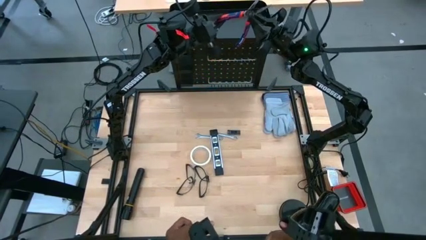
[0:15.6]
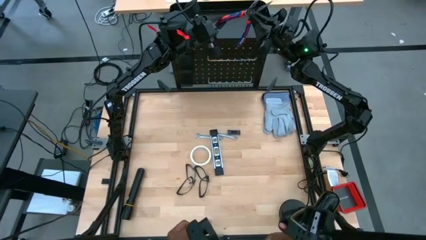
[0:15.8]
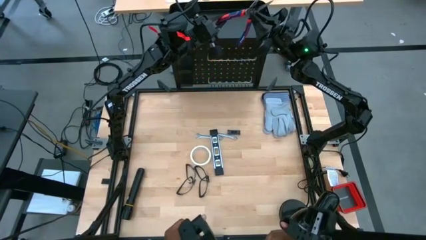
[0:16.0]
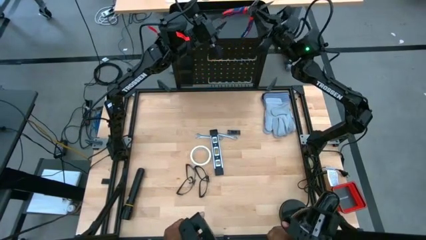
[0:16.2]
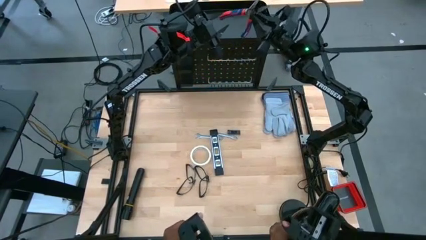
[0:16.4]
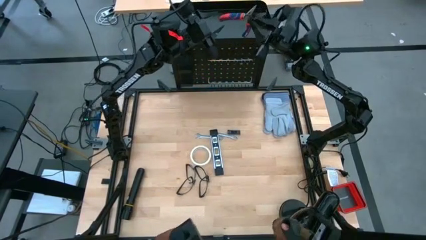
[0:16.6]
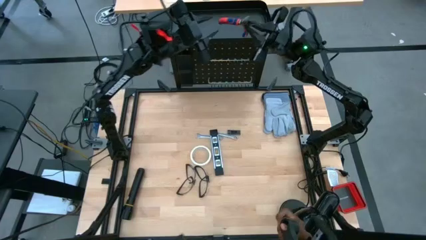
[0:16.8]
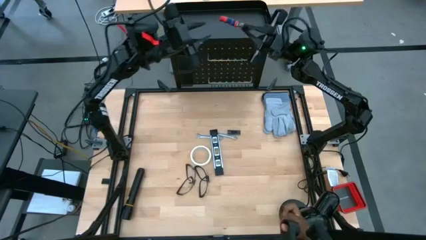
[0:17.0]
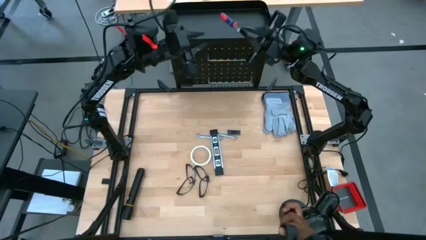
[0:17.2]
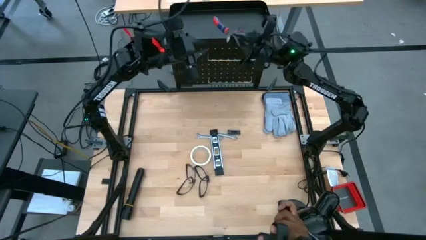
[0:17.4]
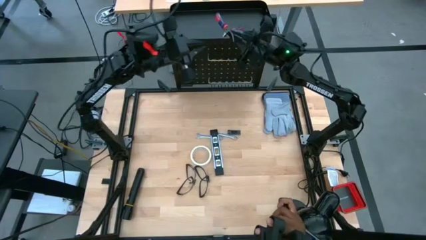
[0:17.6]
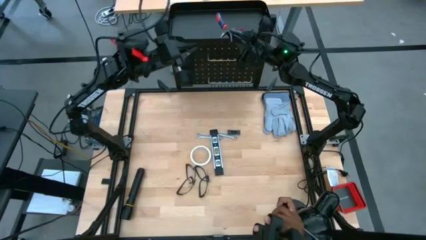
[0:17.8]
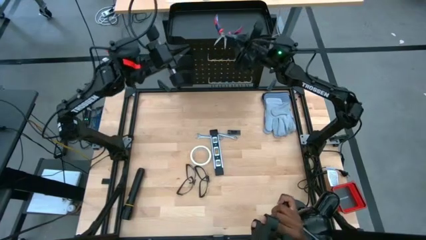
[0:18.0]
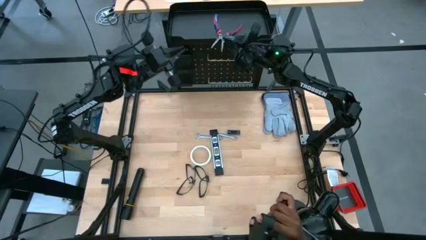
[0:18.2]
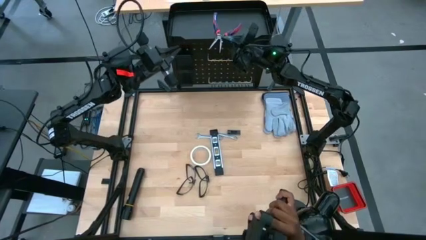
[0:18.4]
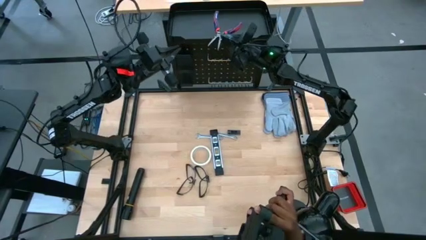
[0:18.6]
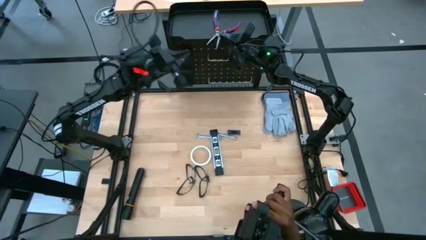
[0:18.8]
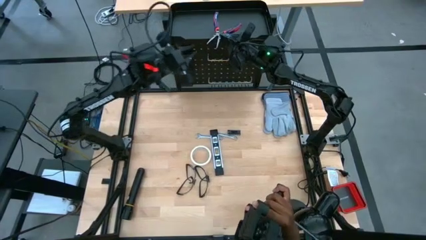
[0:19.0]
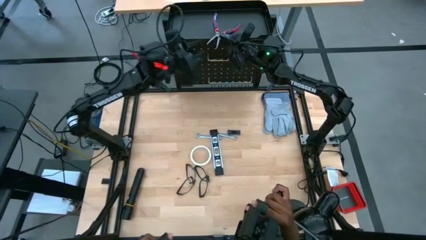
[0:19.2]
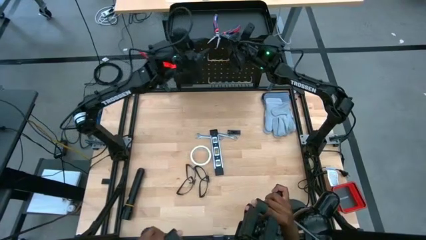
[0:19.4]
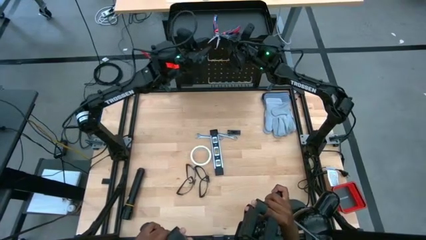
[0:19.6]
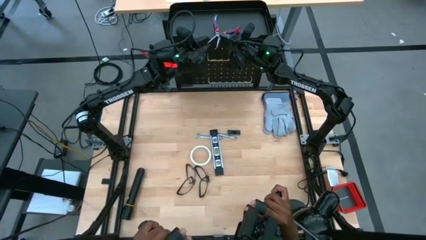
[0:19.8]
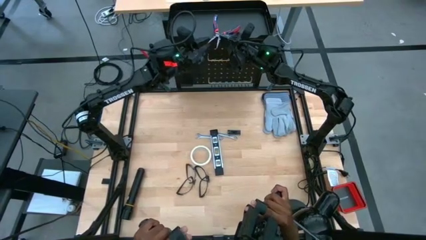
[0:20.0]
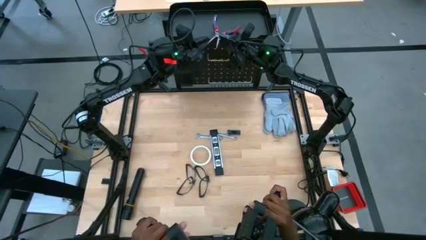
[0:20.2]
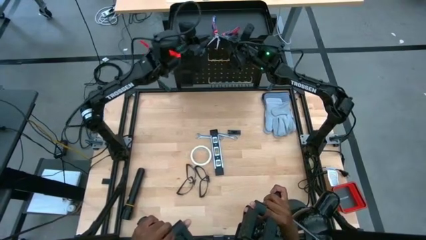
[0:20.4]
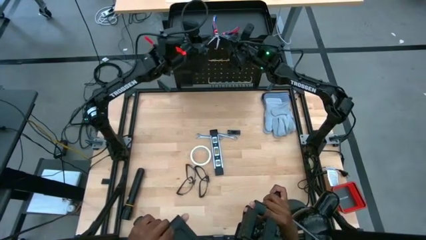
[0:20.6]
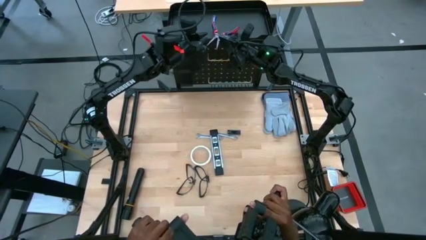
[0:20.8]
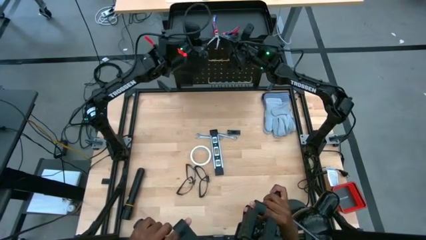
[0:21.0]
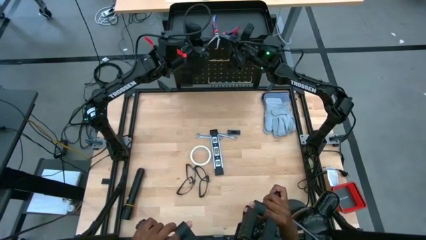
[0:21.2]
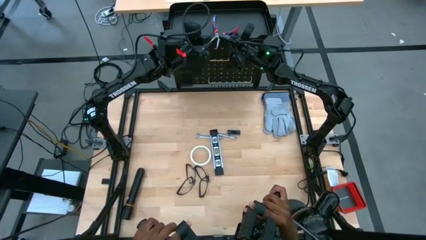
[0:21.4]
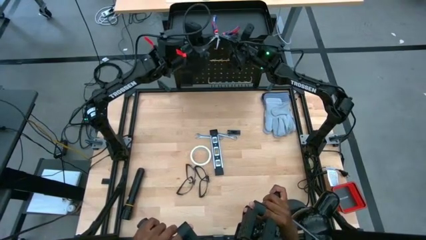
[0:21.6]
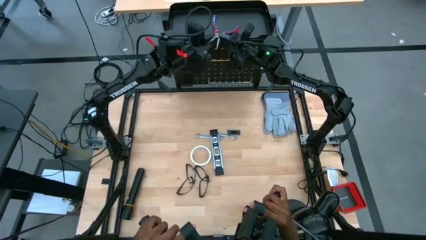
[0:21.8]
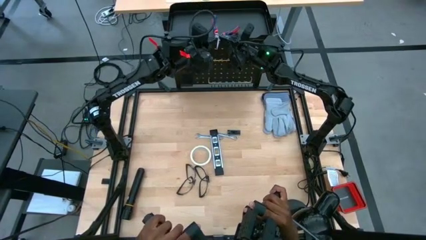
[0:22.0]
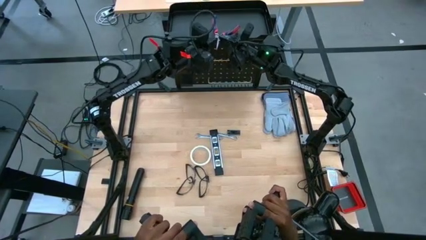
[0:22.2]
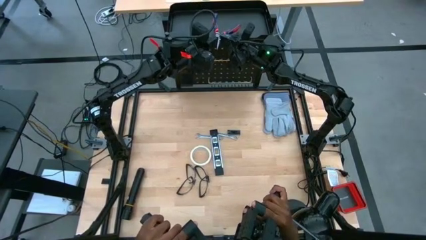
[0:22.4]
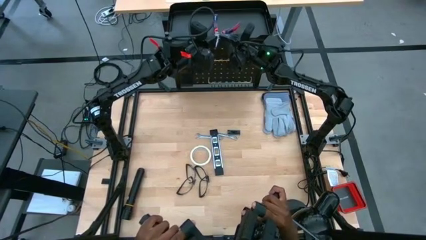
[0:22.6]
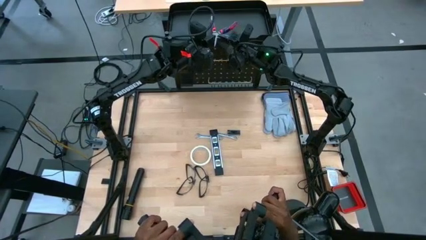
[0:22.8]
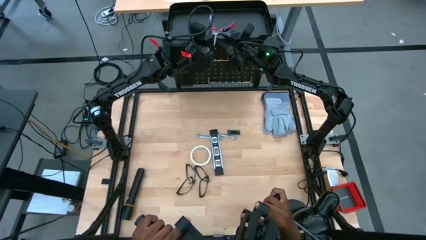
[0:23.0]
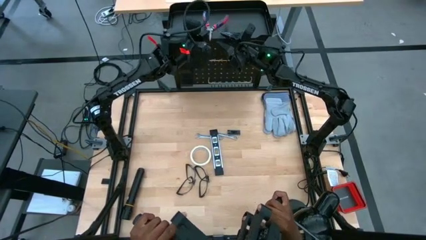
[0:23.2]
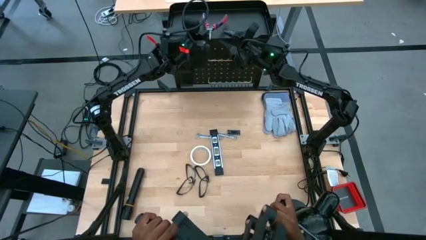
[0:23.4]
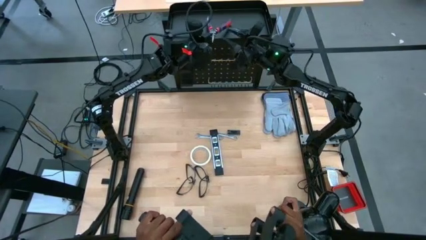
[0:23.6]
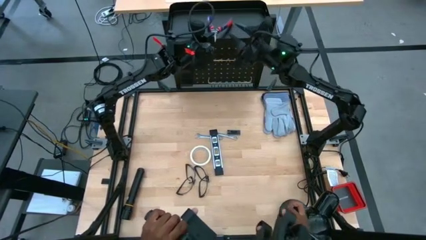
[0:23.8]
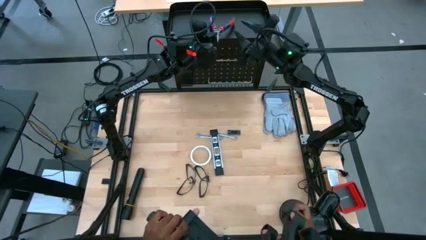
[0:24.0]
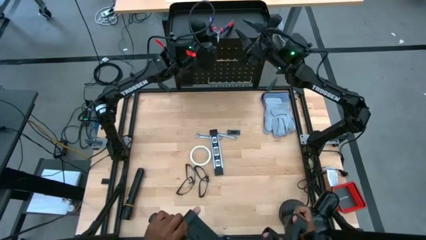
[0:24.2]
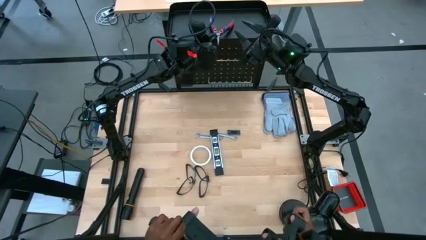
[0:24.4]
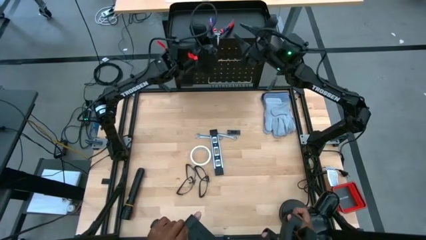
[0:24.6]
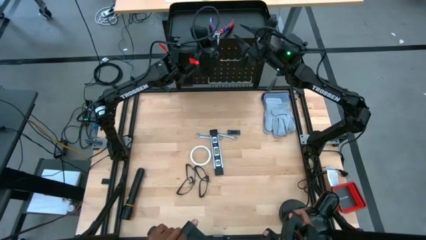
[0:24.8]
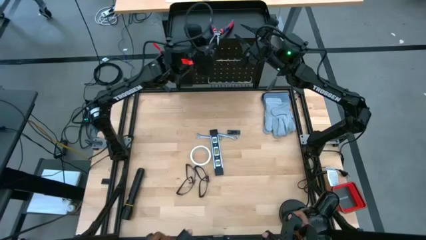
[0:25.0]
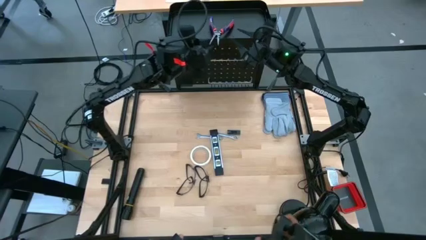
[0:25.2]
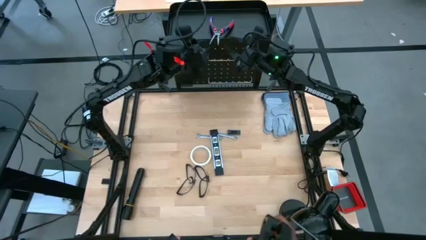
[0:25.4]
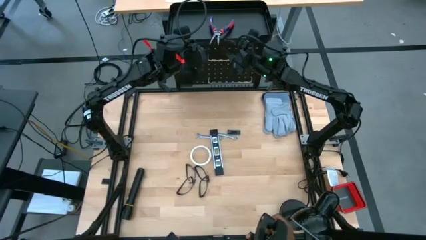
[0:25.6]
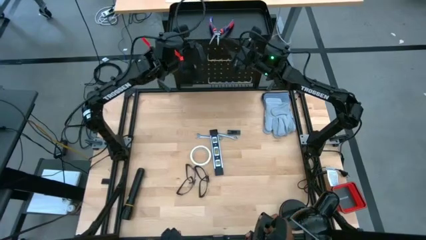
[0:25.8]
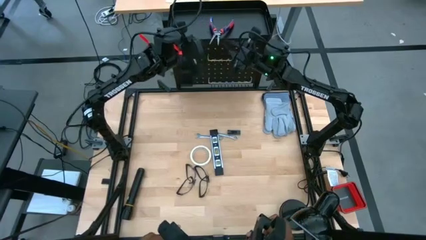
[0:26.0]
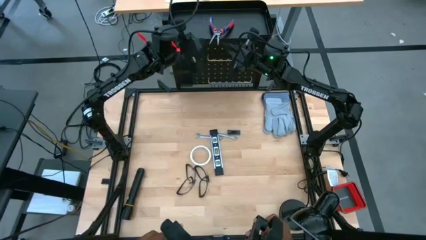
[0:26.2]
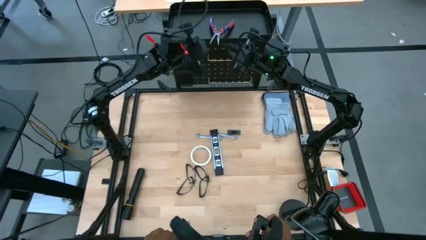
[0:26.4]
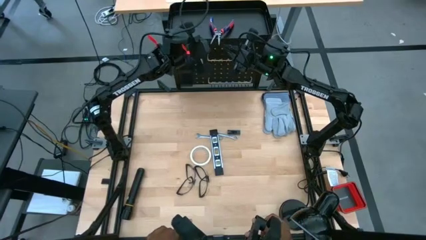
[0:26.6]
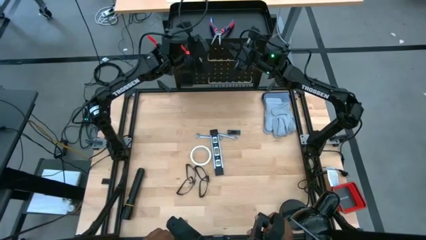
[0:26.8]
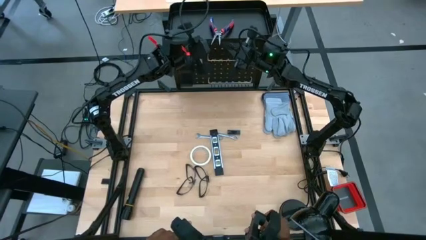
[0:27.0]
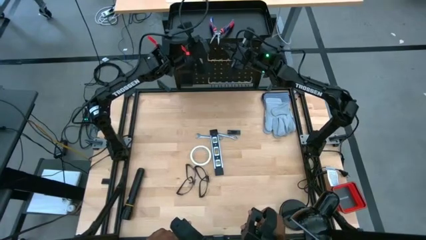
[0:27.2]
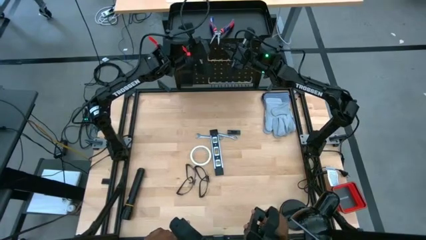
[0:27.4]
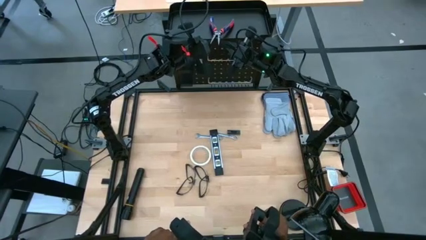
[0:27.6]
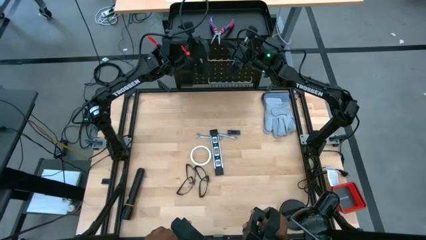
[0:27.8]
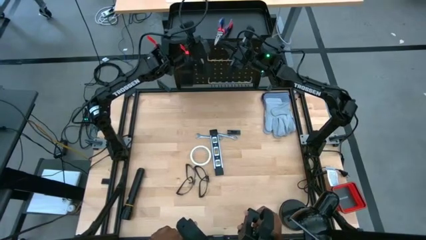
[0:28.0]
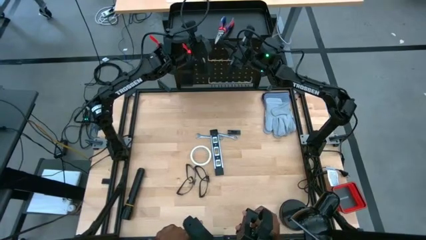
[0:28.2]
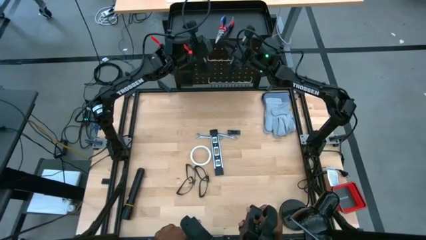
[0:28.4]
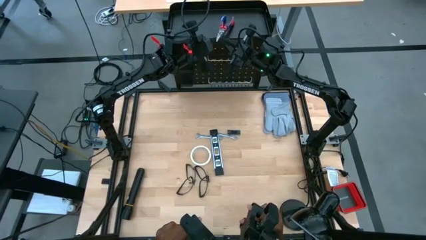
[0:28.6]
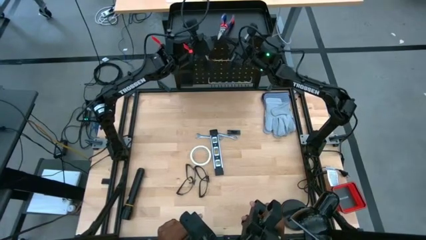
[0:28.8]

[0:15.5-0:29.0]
Task: Hang tools onto peg board
Put the blue-orange pliers on the black pegboard
